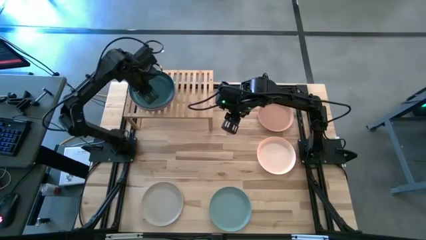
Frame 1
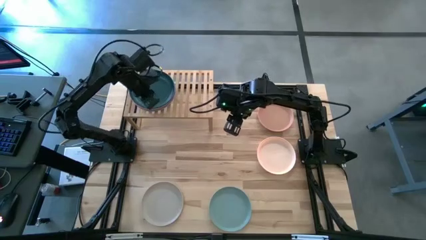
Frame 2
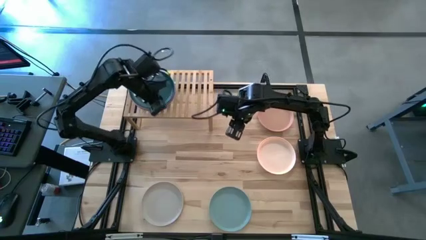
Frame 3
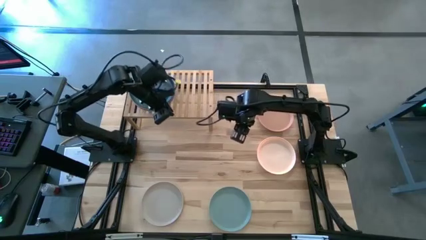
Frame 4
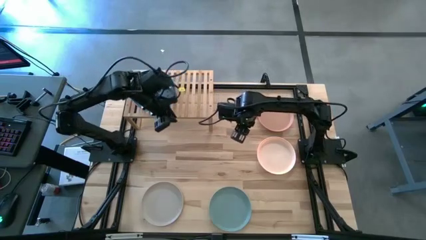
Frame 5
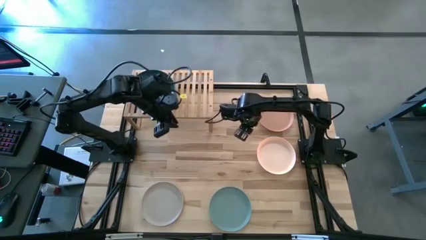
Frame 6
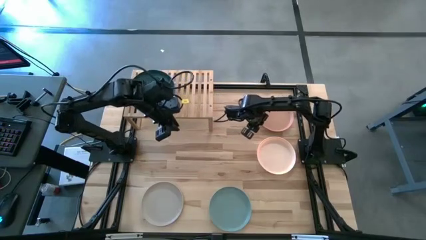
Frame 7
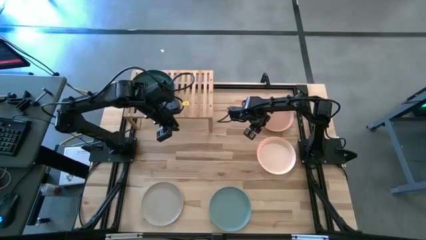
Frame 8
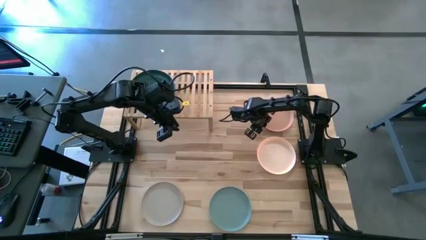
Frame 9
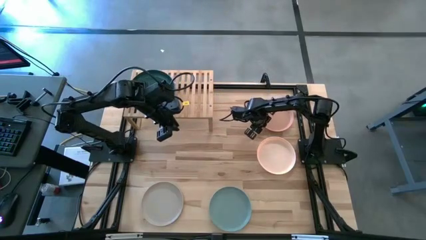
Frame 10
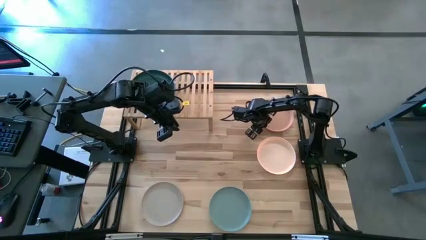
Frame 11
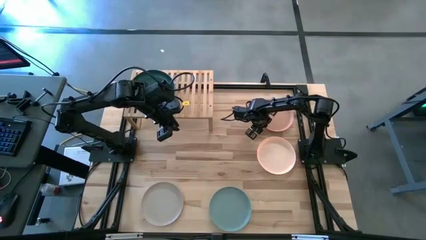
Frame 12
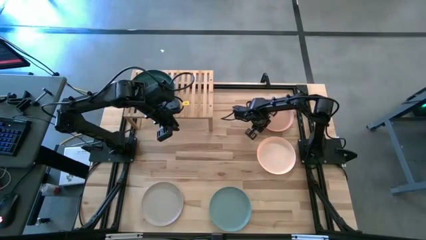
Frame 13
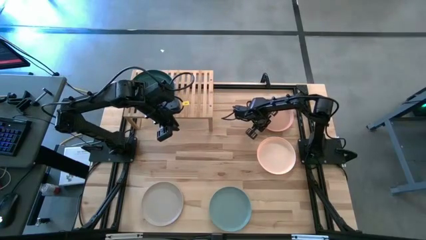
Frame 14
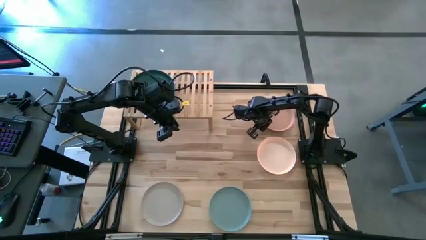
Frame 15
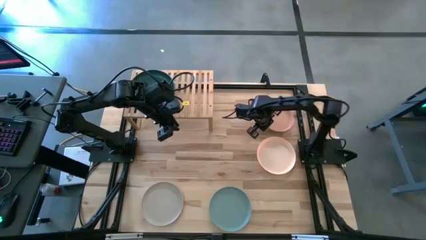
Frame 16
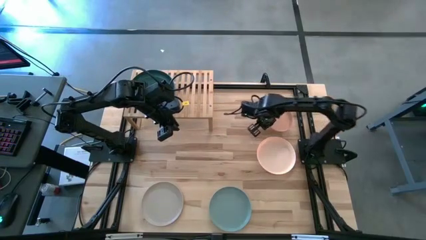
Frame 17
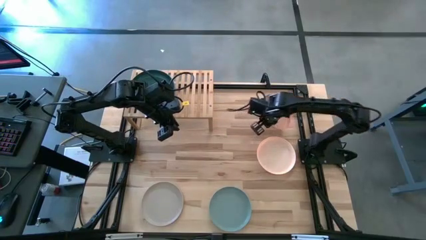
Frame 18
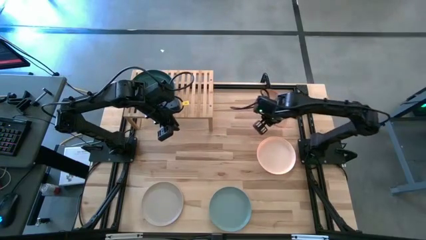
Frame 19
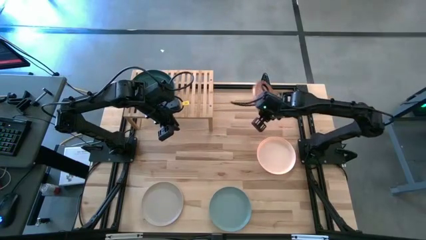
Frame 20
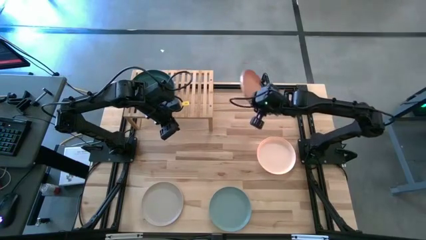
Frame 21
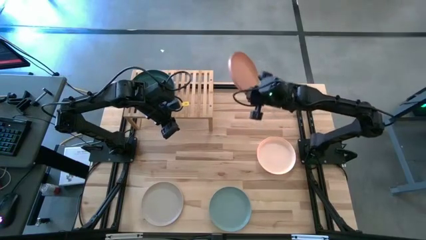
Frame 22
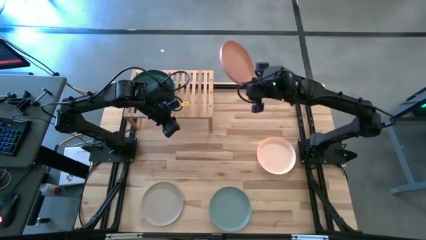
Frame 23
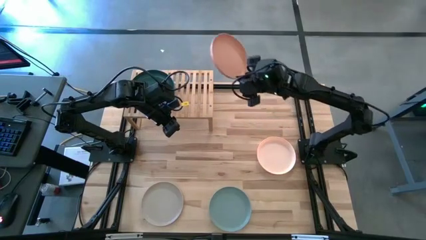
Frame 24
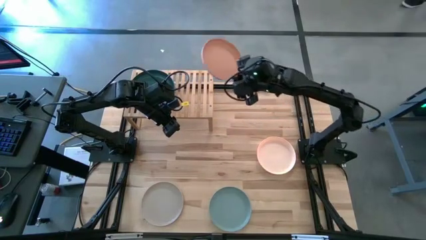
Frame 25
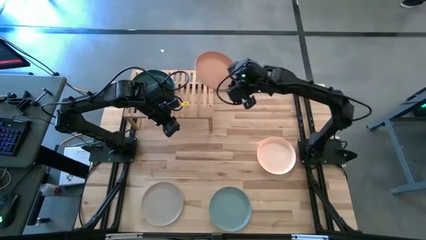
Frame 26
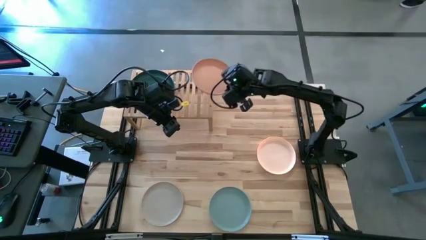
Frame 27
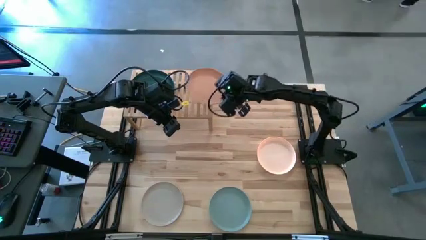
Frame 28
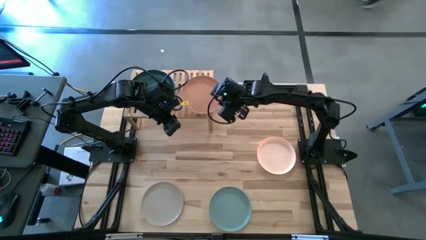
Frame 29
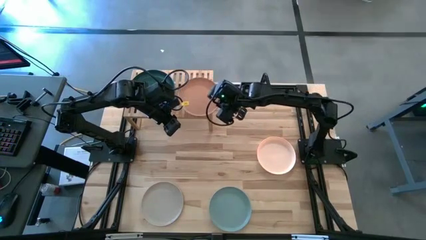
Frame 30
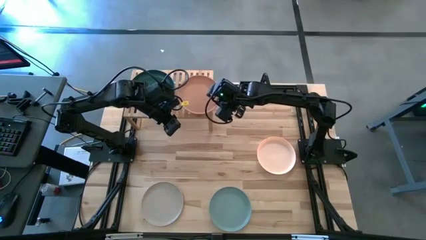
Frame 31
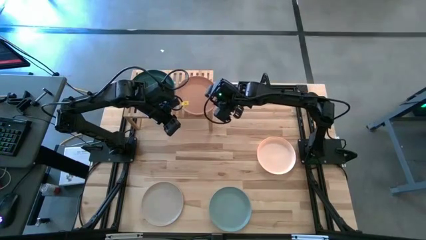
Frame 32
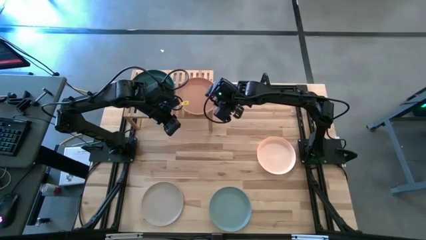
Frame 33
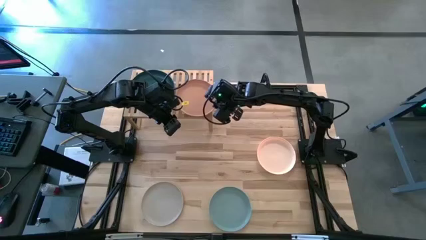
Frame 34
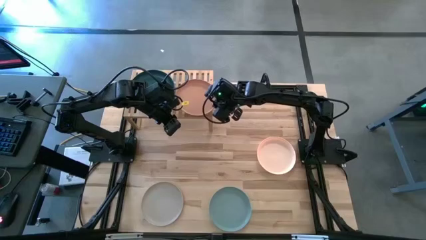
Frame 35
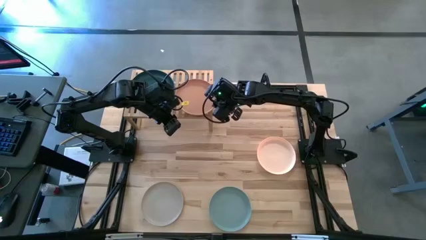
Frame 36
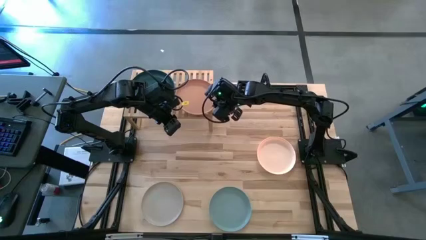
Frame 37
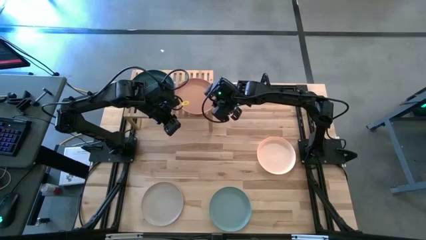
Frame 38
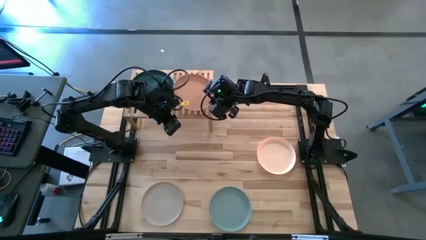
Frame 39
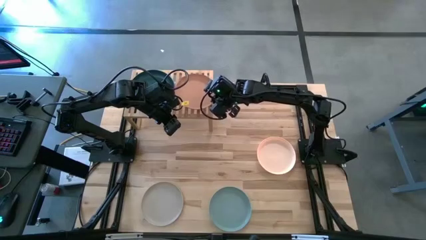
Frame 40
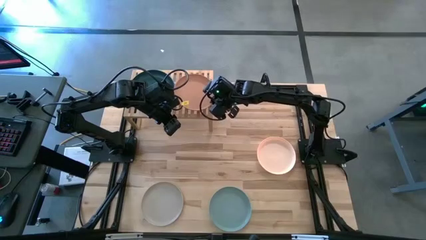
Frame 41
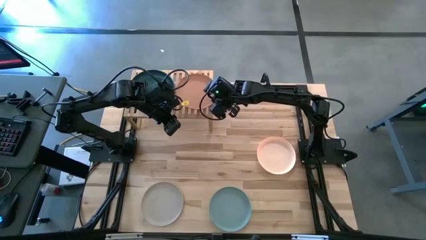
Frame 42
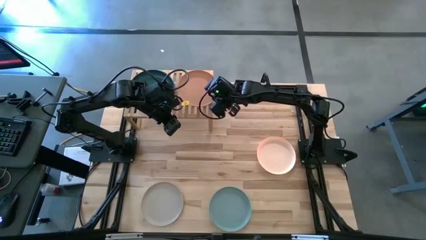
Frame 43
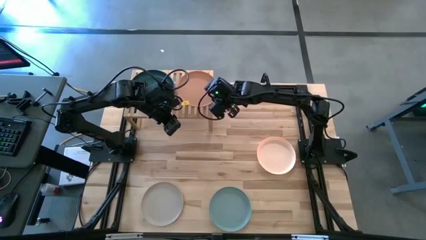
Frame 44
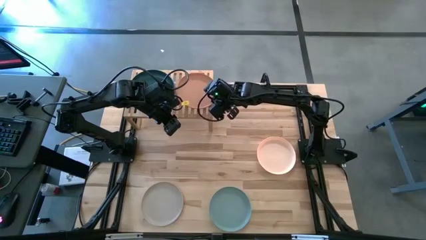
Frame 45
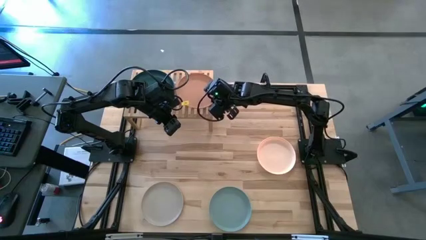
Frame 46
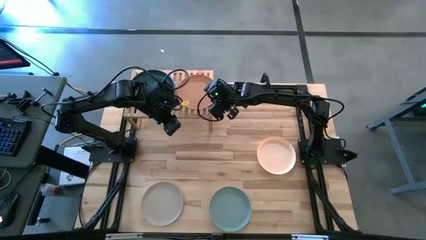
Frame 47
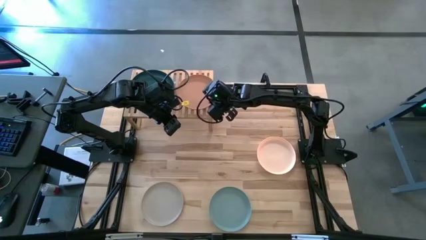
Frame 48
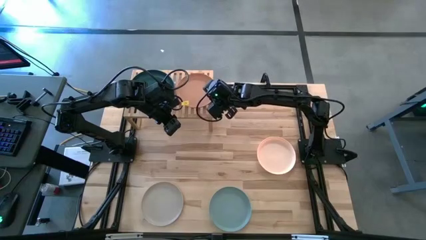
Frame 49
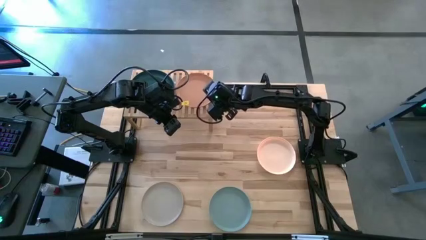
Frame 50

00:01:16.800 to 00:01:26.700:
Task: Place and stack plates onto a shelf
Put the brown plate on the top of the shelf

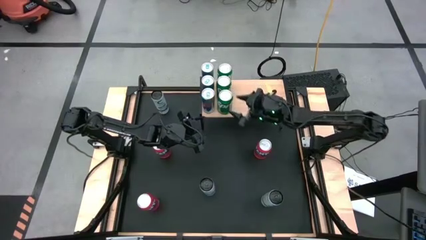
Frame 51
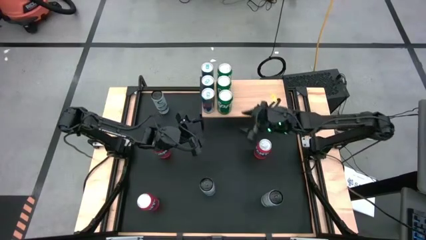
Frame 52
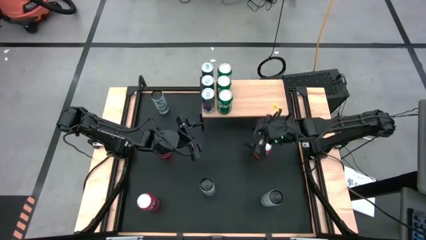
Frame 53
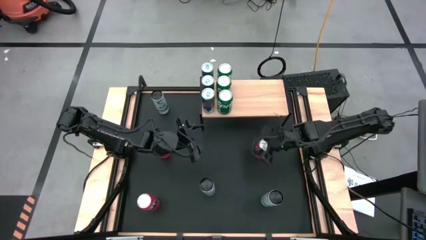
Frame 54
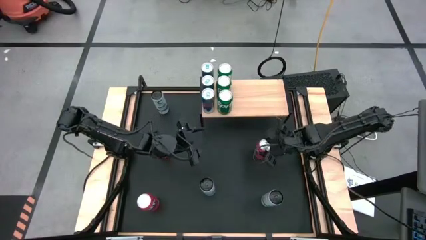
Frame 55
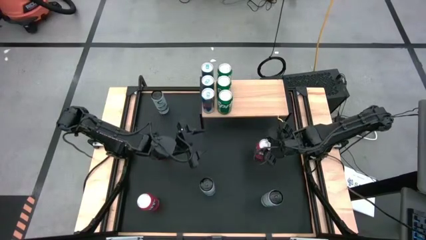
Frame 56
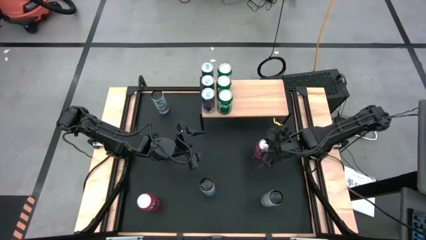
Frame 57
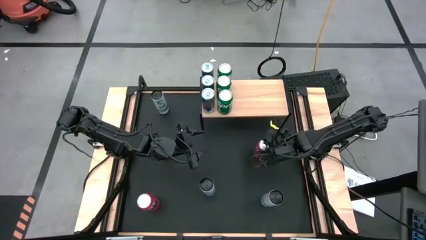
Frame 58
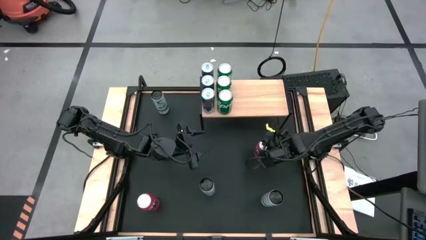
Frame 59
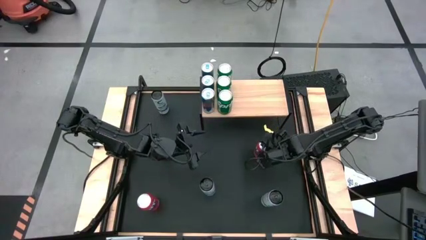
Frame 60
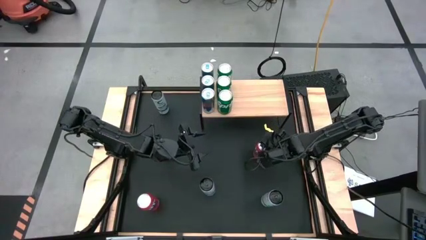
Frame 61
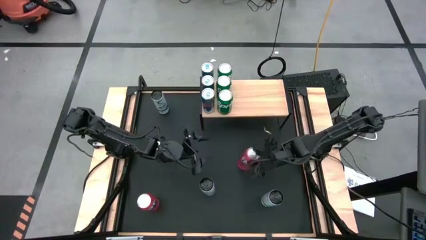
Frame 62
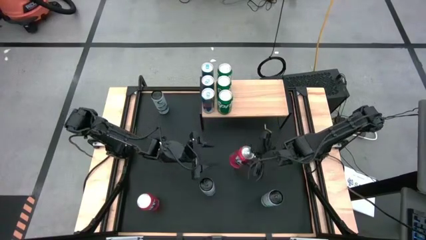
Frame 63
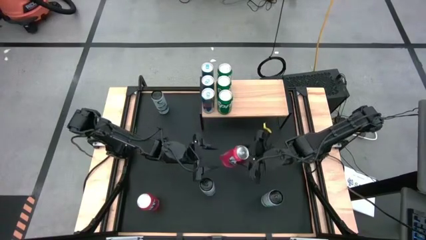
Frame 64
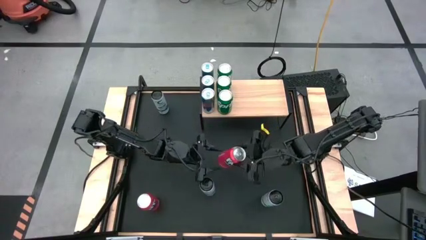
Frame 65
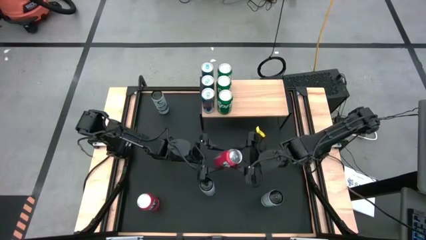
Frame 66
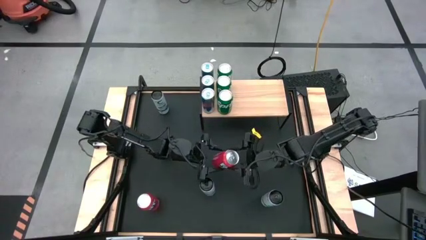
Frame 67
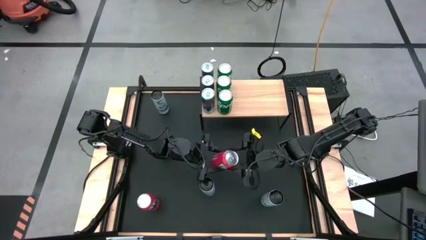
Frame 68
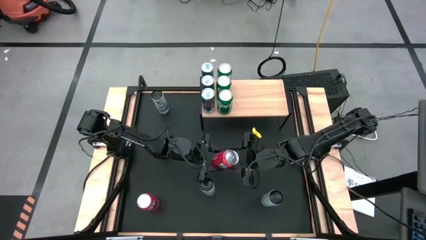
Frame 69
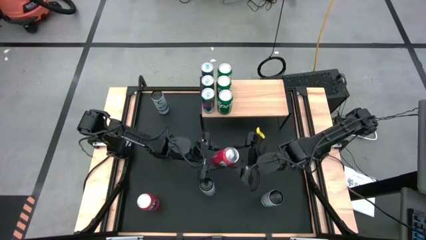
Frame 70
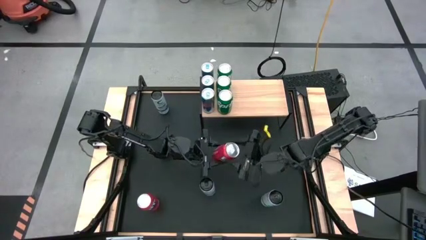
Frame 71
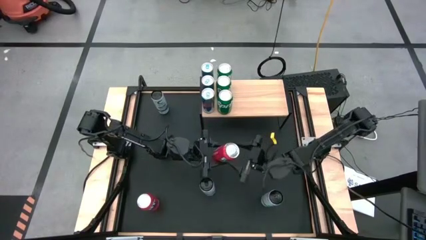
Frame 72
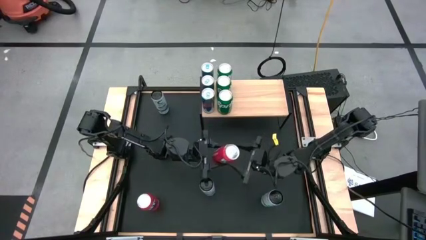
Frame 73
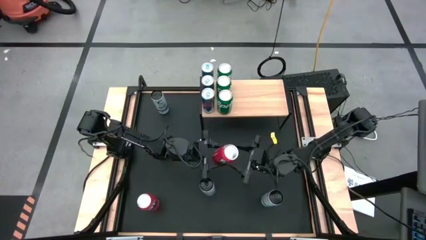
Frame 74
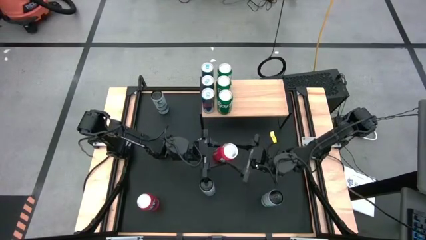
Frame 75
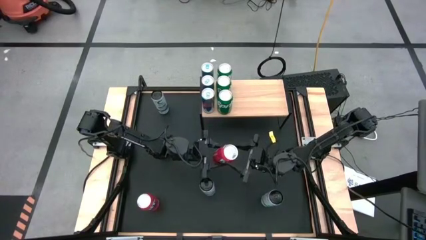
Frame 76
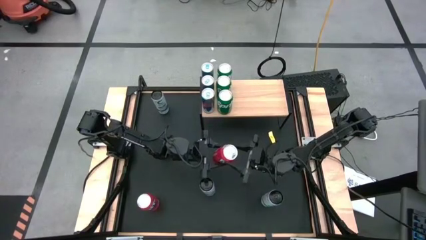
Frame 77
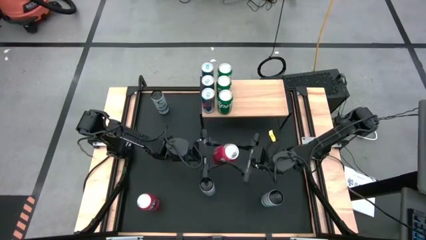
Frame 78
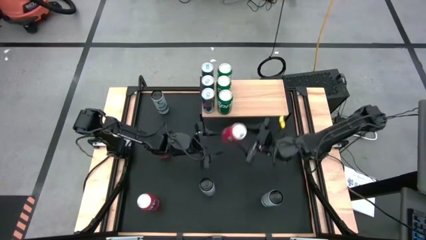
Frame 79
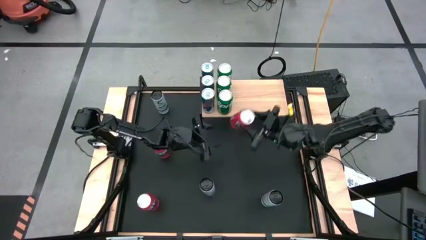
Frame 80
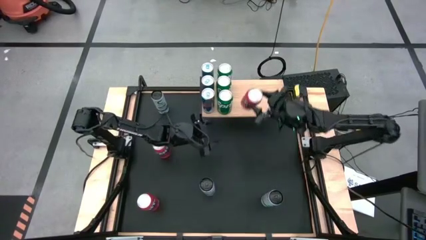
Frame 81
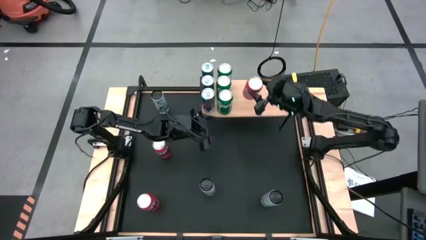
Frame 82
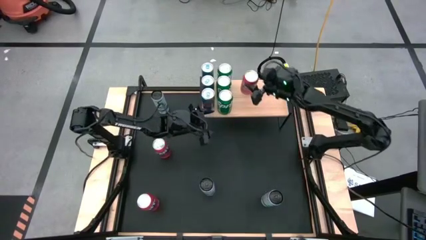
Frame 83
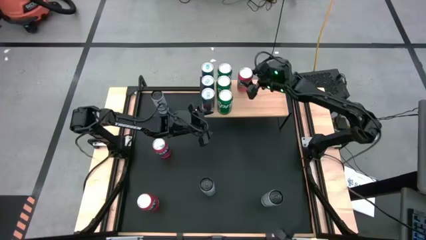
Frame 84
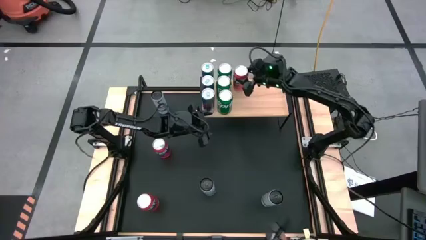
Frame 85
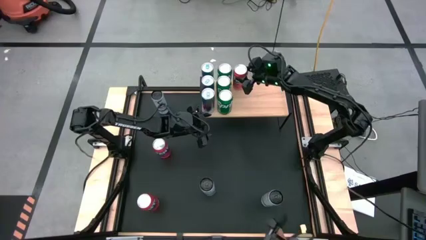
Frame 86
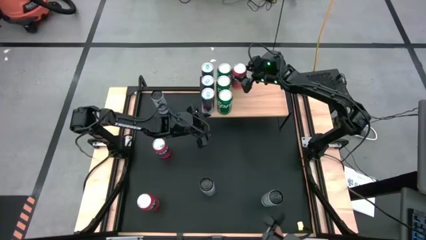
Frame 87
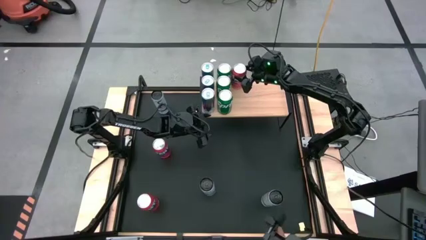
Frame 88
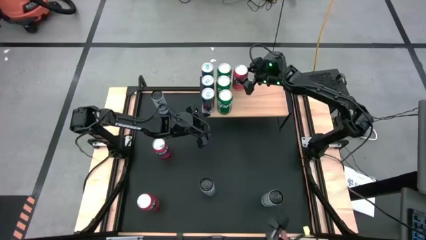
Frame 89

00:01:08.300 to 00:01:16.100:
Task: Place canned beverage on shelf
Put the top right red soda can on the shelf
